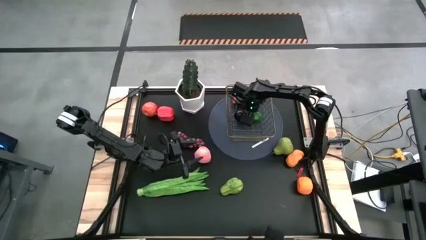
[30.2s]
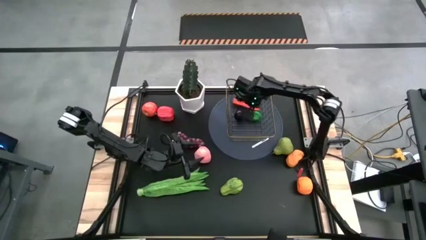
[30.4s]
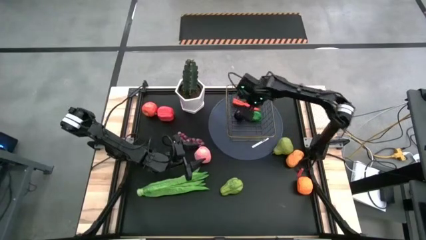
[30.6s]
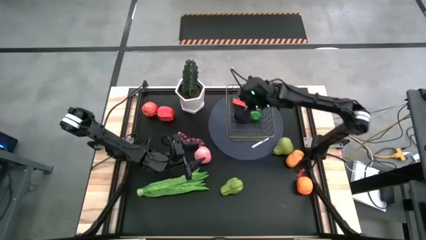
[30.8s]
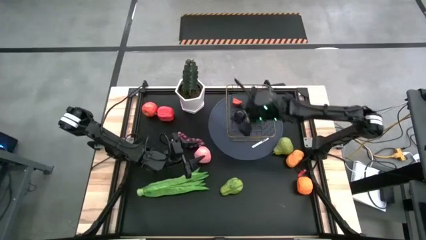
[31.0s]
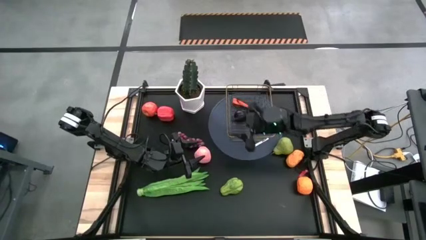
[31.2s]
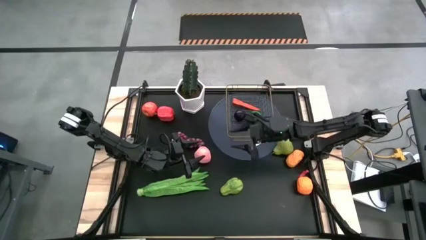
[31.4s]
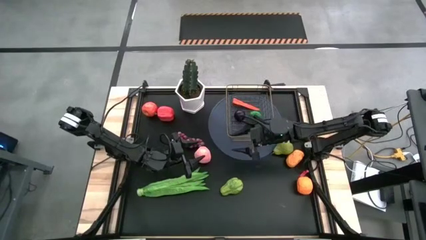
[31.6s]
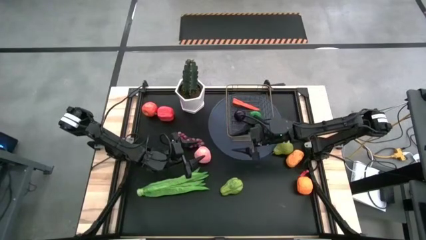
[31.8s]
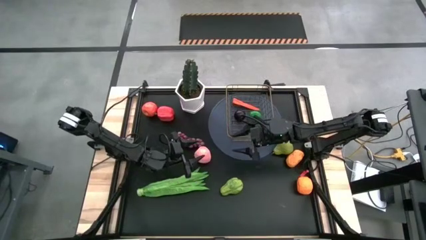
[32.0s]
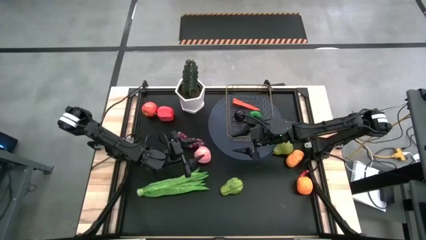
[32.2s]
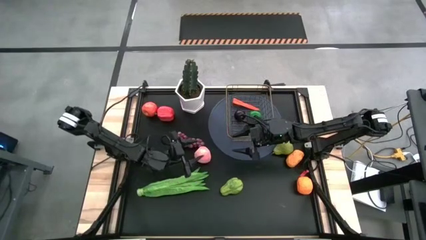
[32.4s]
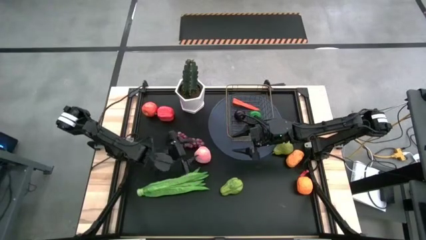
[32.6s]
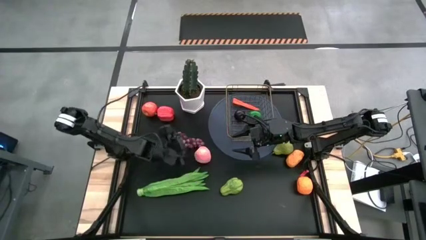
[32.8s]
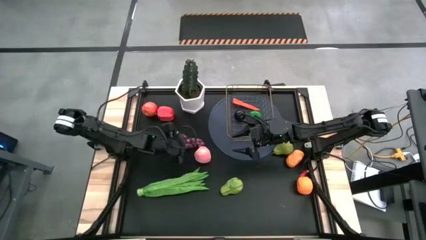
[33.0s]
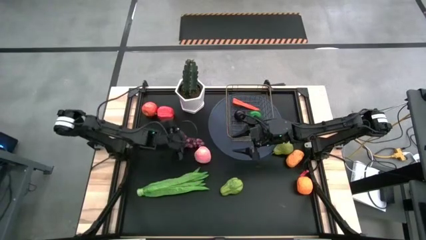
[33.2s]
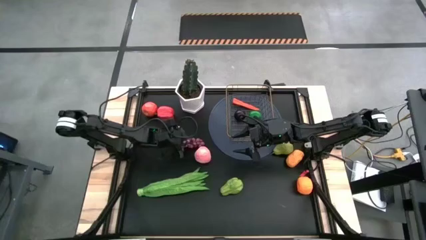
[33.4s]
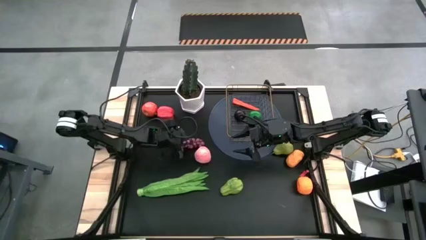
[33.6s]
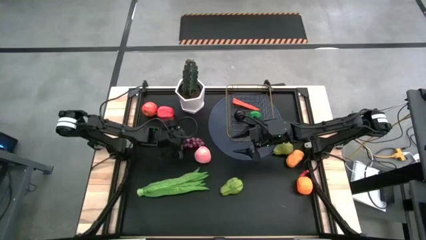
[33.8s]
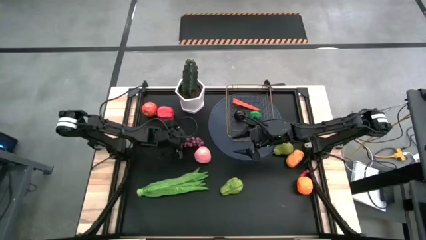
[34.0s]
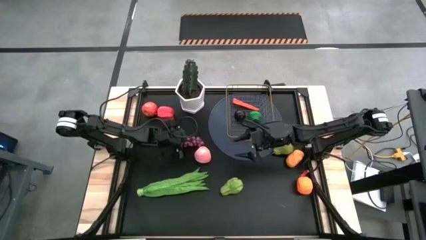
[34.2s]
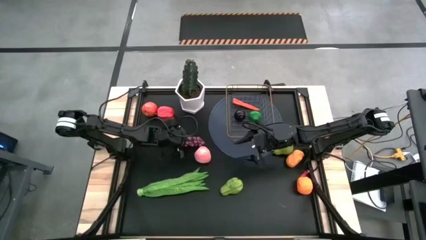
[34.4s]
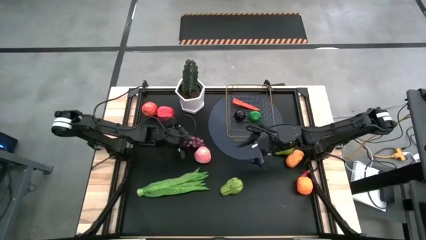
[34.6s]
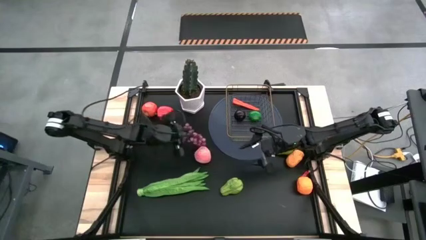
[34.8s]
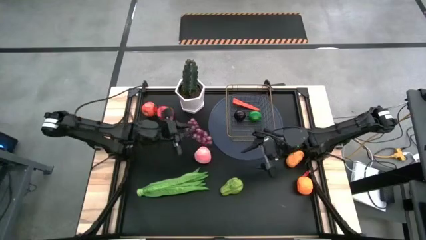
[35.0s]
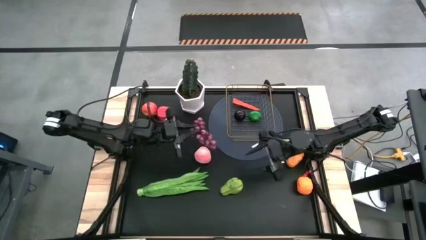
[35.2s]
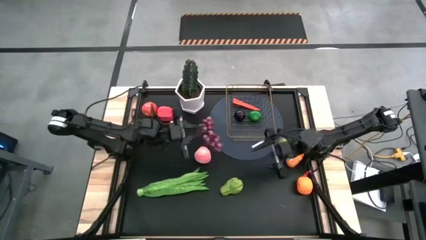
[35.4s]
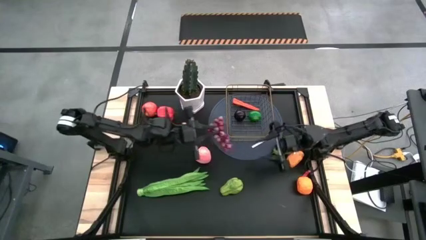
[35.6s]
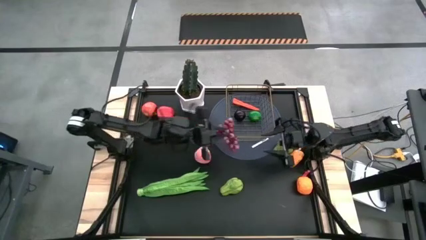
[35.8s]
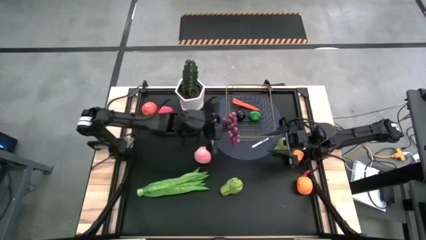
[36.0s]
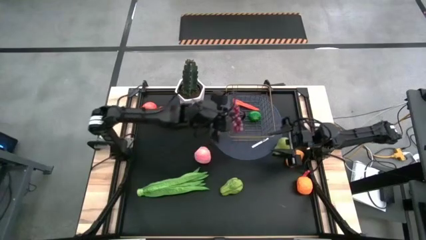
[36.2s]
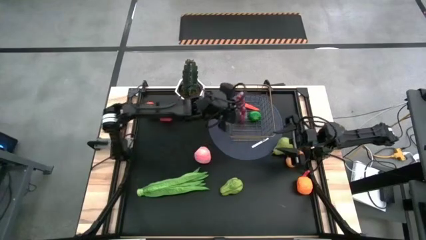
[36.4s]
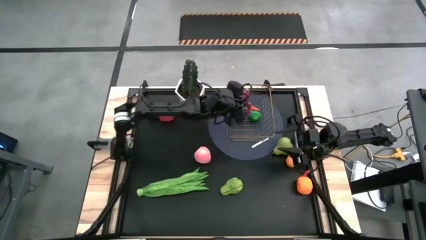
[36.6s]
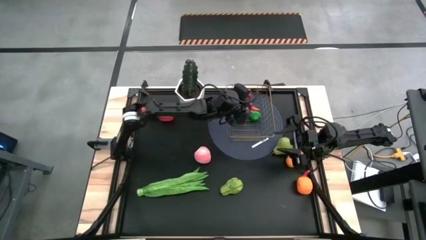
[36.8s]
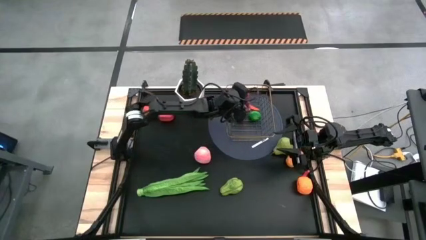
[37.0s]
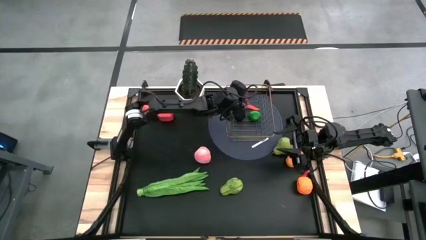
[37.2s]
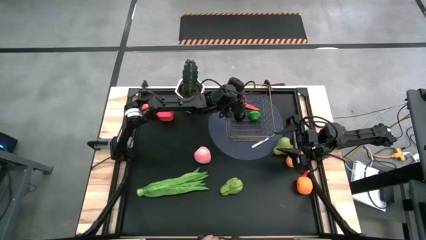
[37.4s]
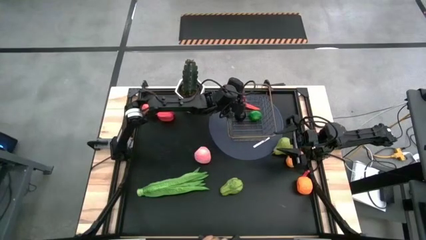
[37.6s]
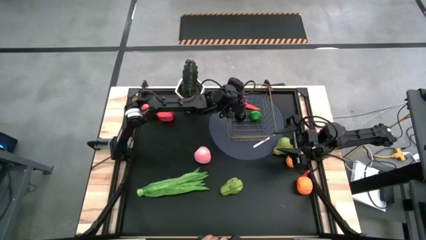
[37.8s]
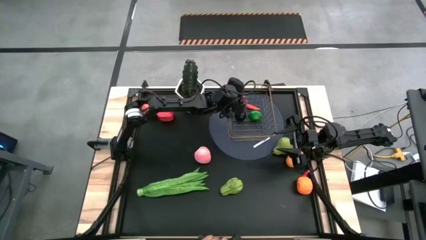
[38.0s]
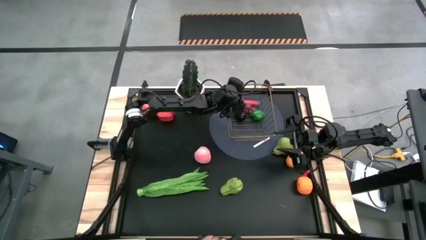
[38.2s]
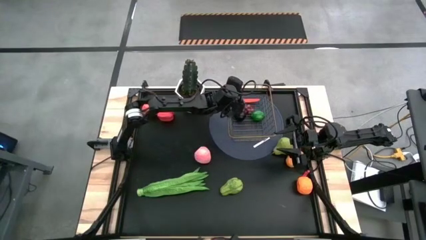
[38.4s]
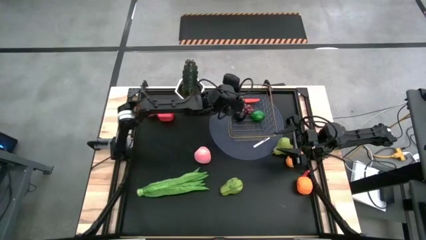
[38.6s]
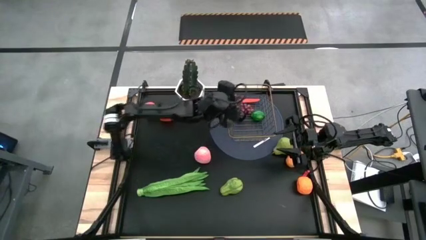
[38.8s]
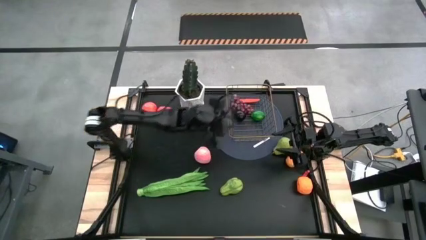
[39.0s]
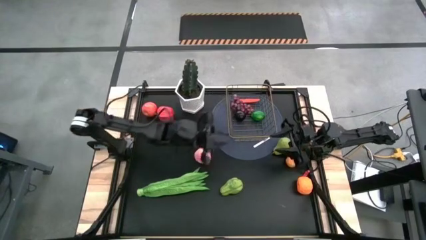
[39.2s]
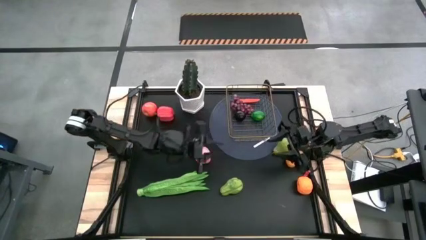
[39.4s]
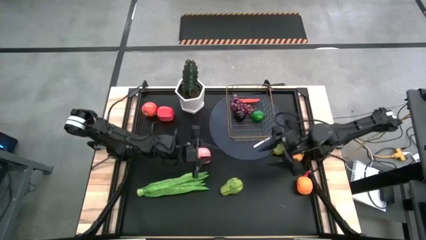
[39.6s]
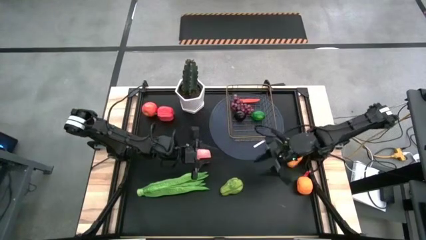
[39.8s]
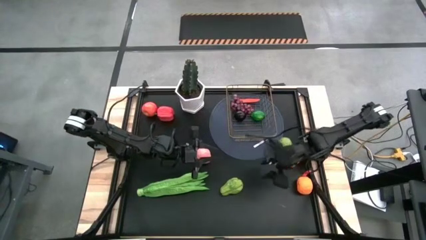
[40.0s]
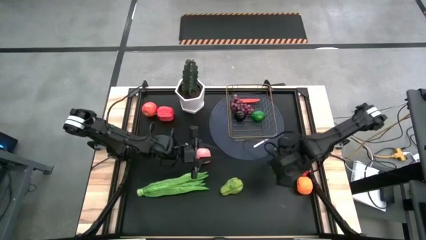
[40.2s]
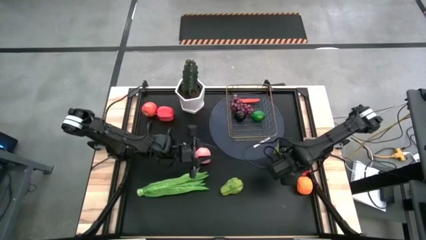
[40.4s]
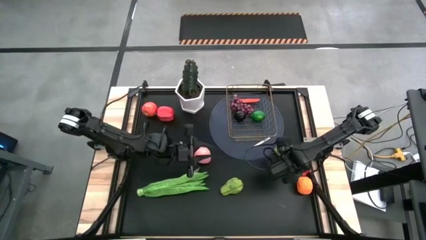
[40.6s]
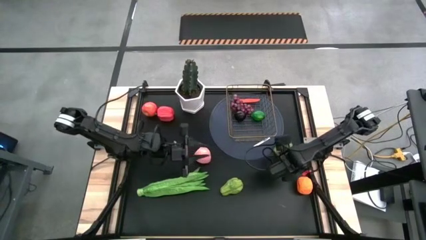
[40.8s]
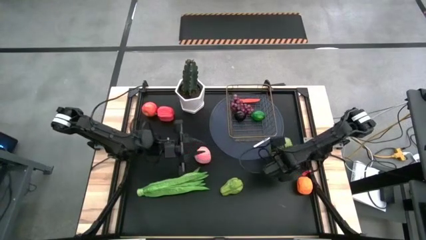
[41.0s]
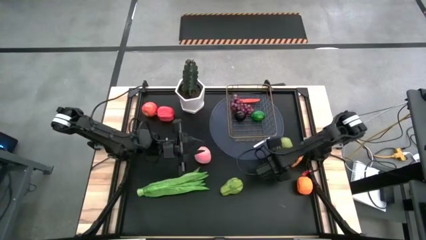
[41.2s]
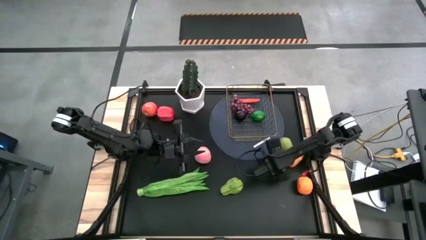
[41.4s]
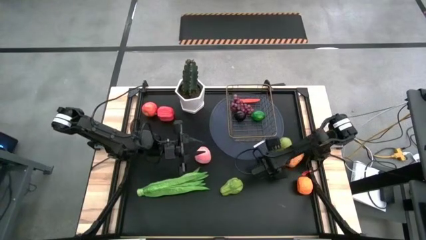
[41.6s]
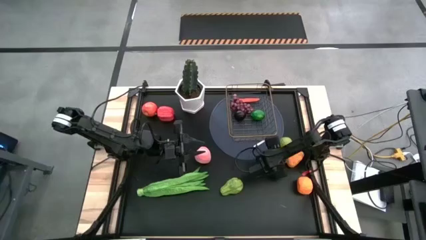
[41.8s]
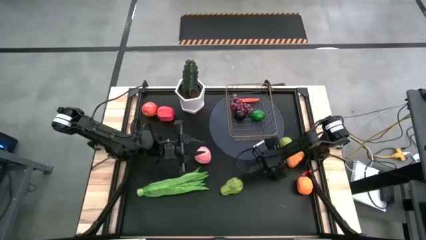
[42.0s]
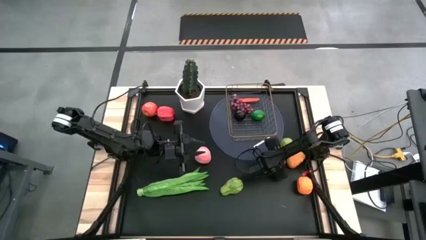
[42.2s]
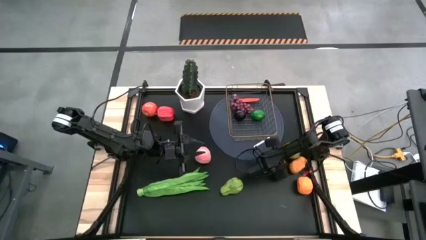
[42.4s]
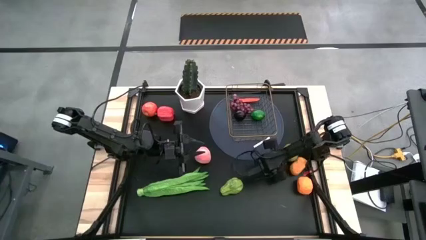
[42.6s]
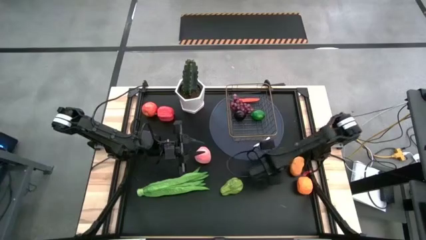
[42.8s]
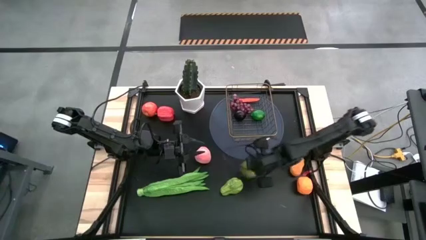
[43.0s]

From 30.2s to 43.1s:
Task: Build produce basket
Put the purple grapes into the gold wire basket

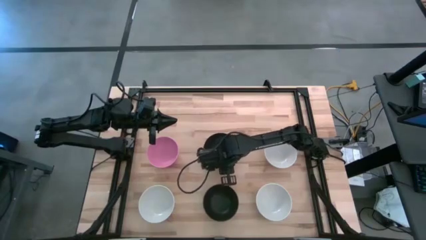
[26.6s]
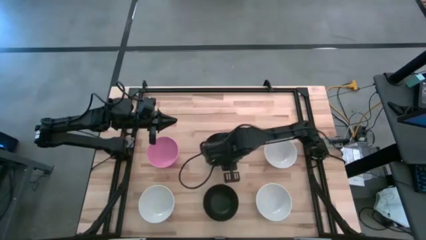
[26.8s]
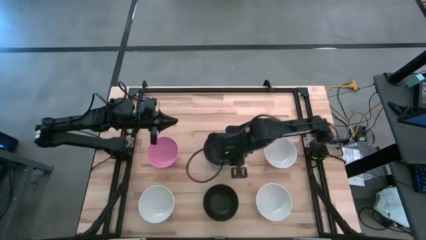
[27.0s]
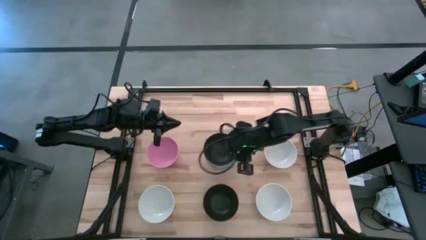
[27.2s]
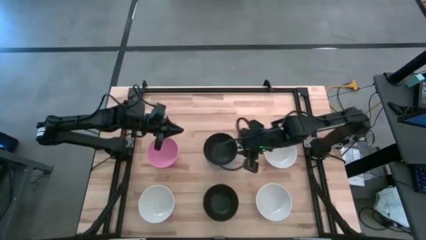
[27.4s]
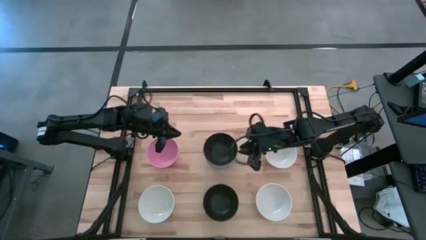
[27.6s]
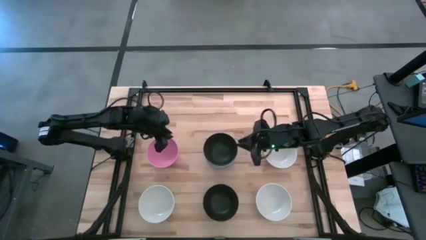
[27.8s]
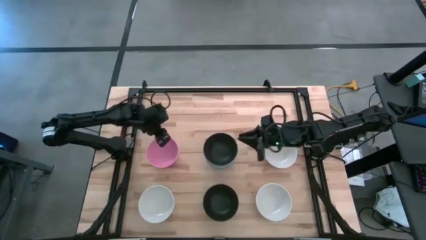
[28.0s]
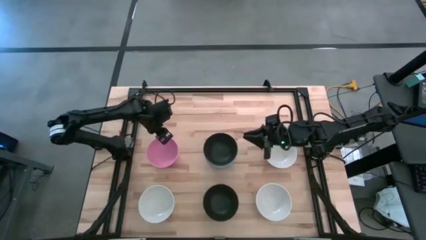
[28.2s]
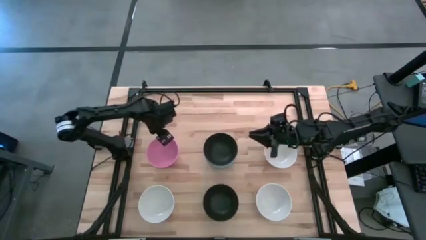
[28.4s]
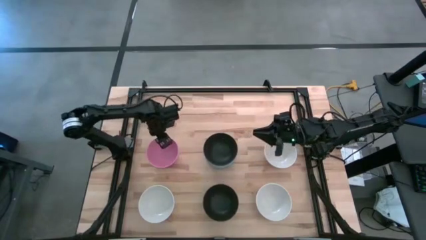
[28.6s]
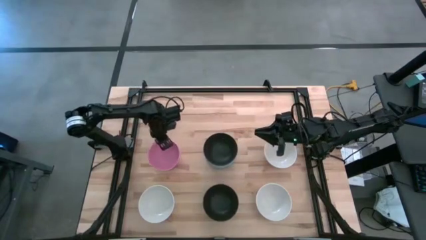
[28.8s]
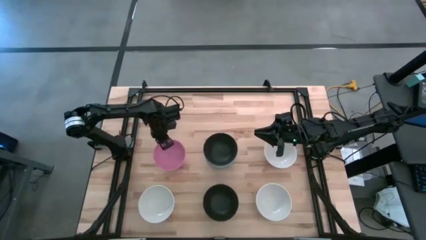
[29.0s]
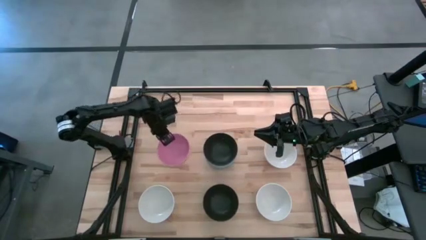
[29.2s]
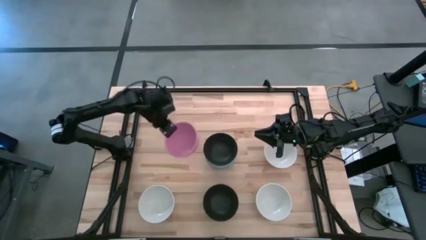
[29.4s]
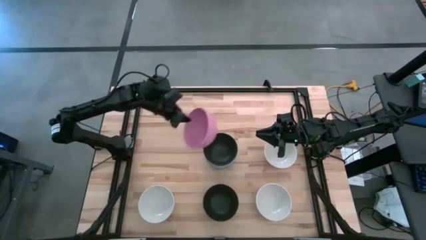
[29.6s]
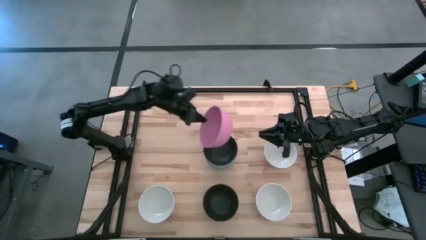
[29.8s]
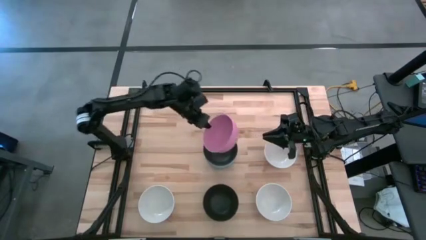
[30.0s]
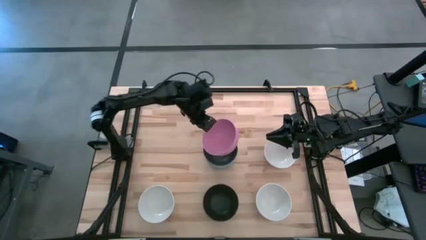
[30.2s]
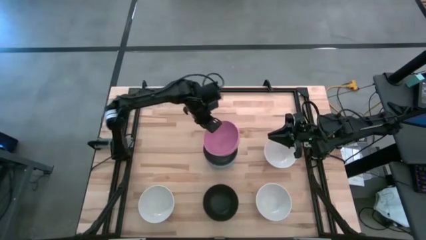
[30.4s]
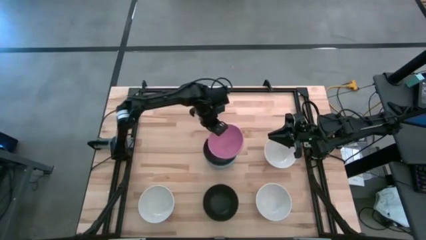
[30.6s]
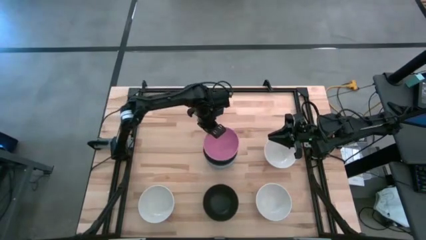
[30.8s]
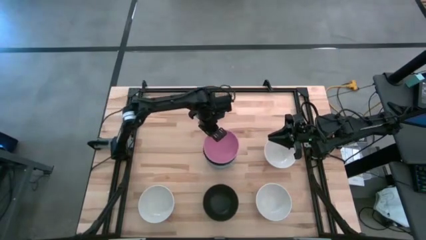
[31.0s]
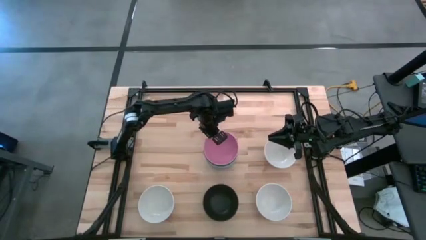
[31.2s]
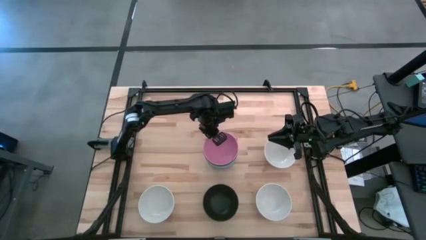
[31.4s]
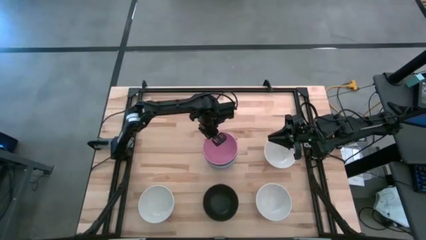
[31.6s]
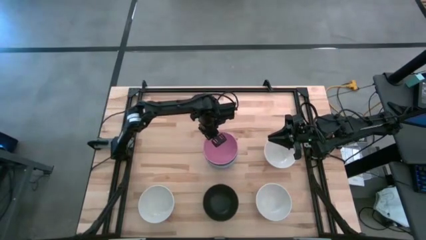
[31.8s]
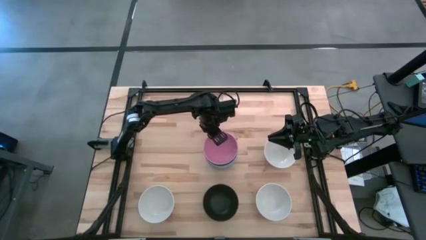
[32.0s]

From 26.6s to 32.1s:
Task: Nest bowls inside each other
Stack the pink bowl on top of the top black bowl
